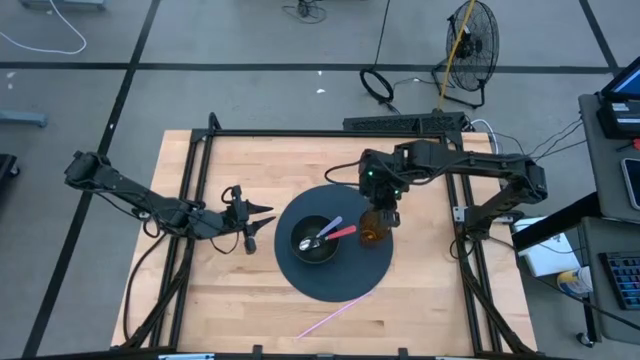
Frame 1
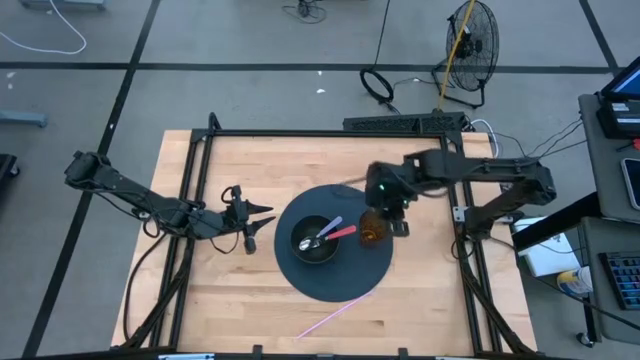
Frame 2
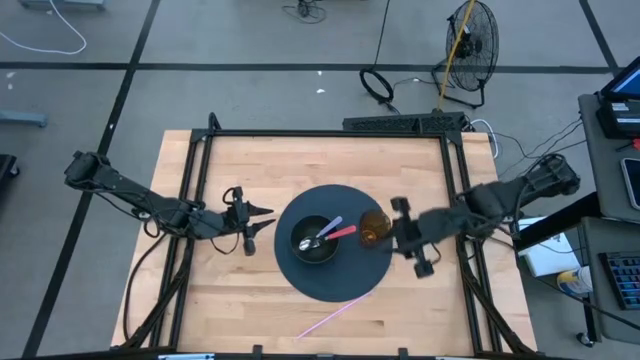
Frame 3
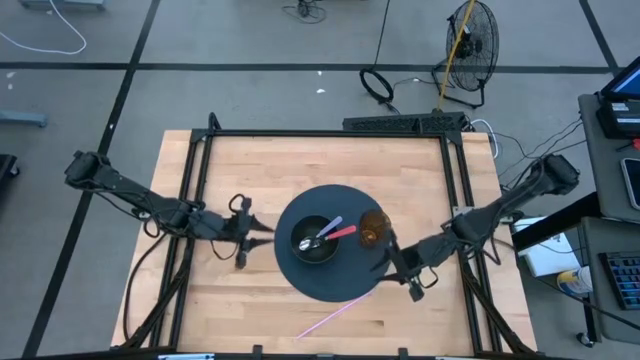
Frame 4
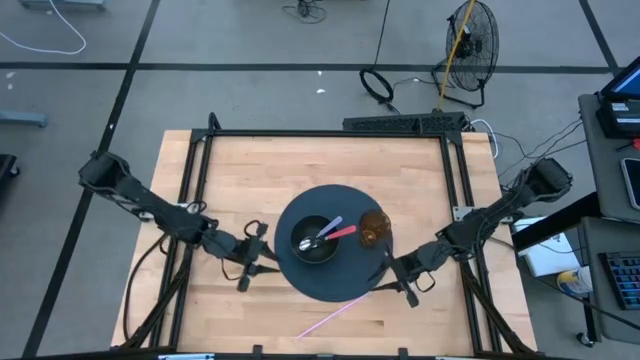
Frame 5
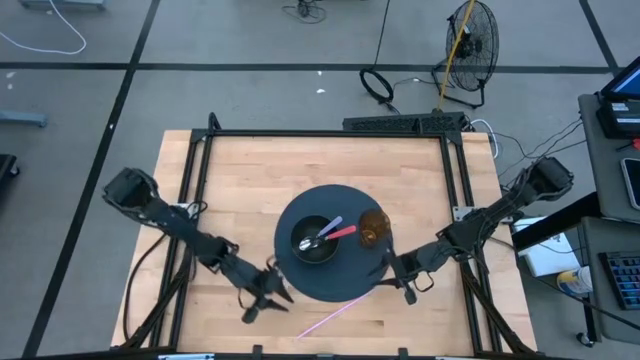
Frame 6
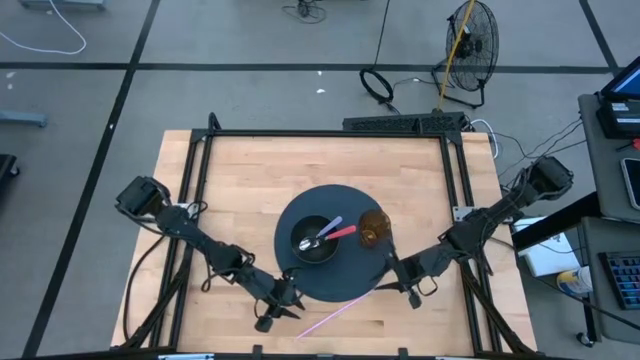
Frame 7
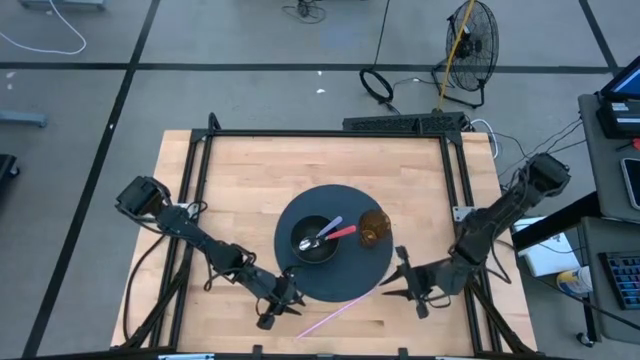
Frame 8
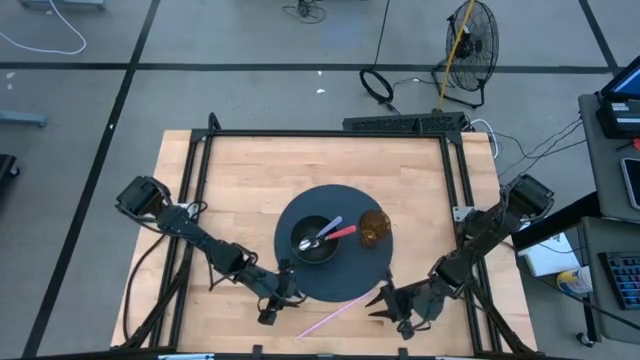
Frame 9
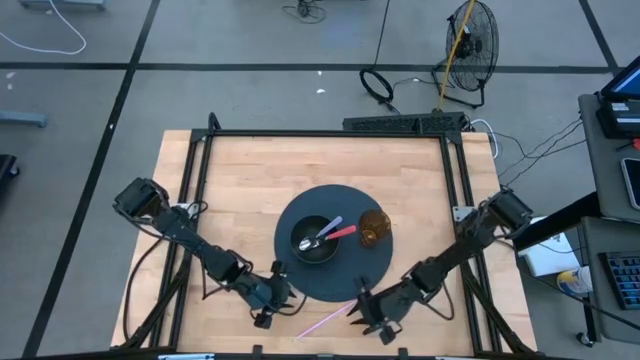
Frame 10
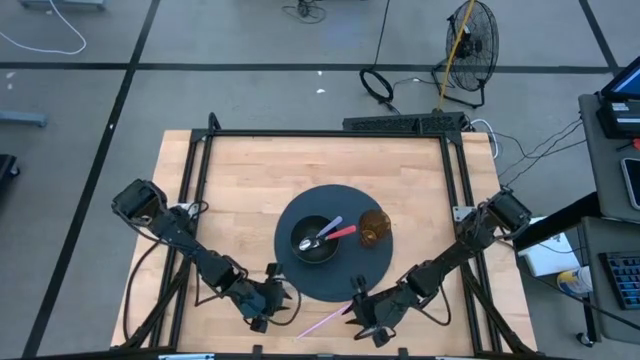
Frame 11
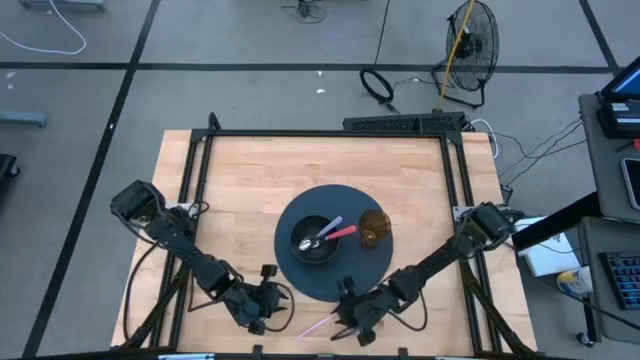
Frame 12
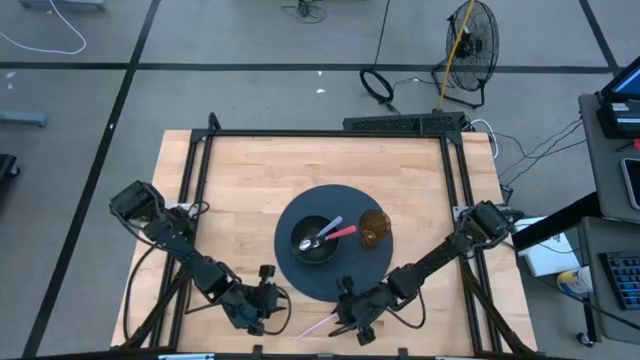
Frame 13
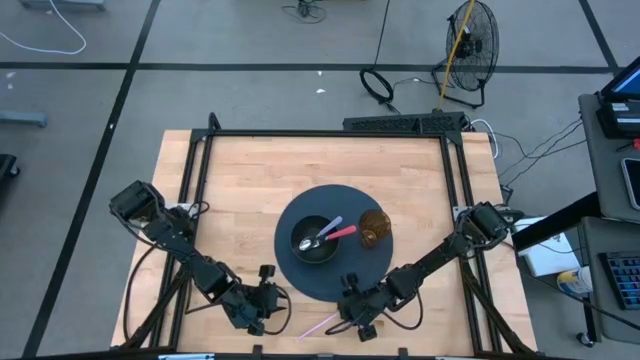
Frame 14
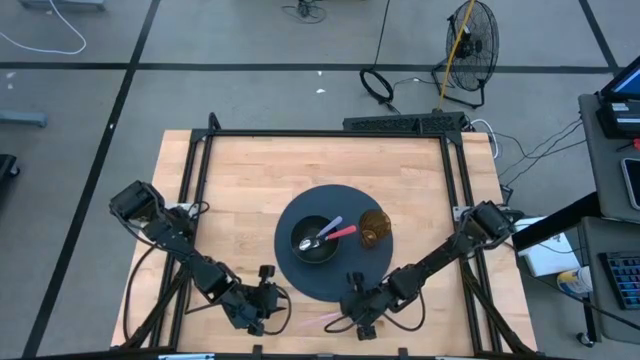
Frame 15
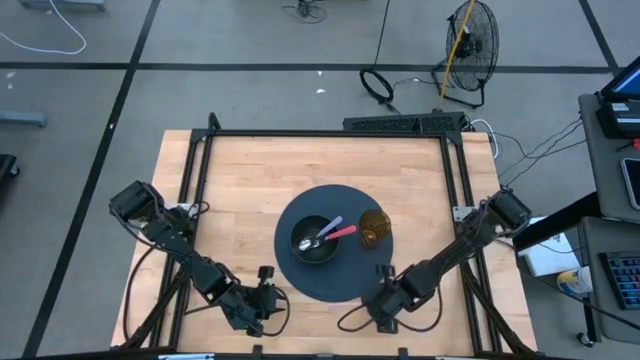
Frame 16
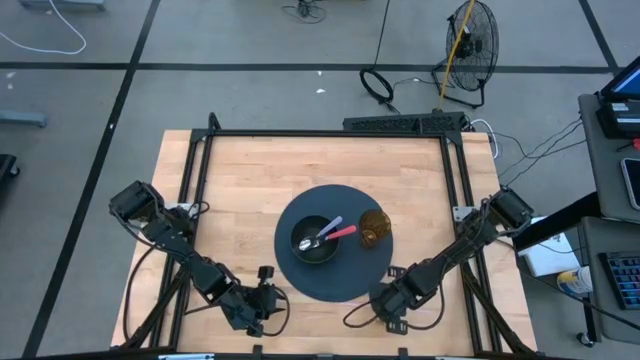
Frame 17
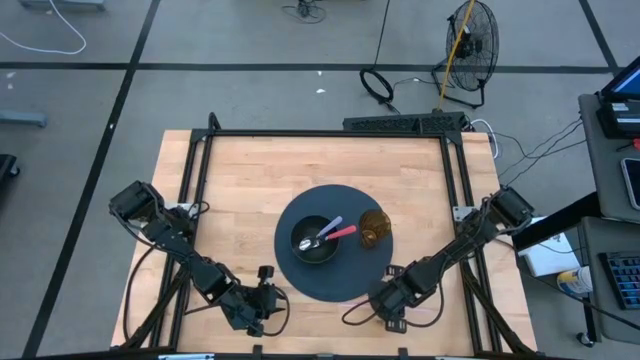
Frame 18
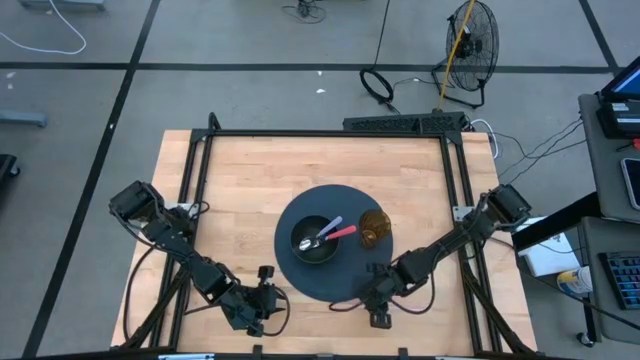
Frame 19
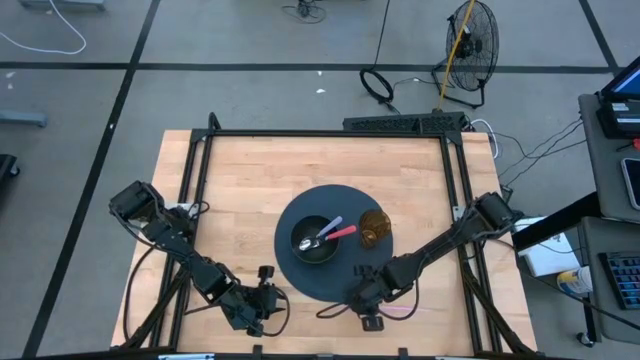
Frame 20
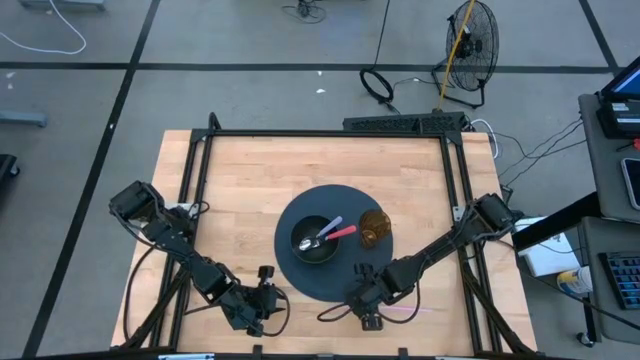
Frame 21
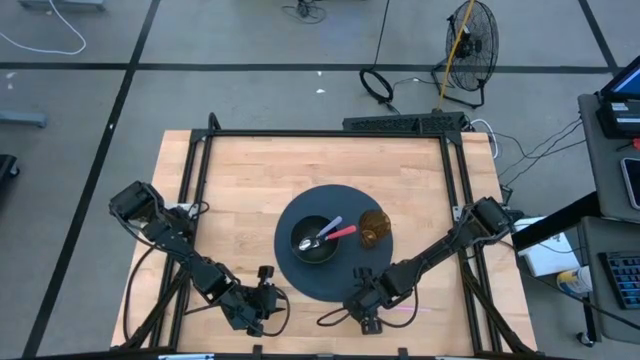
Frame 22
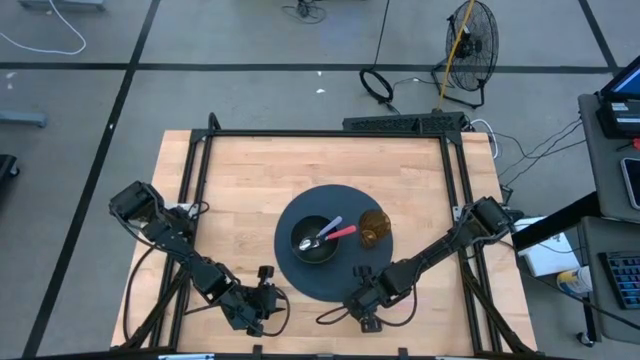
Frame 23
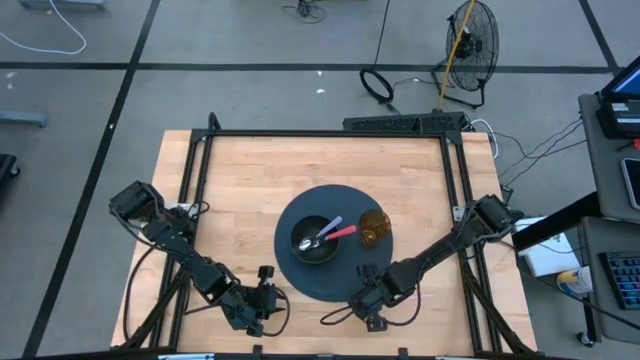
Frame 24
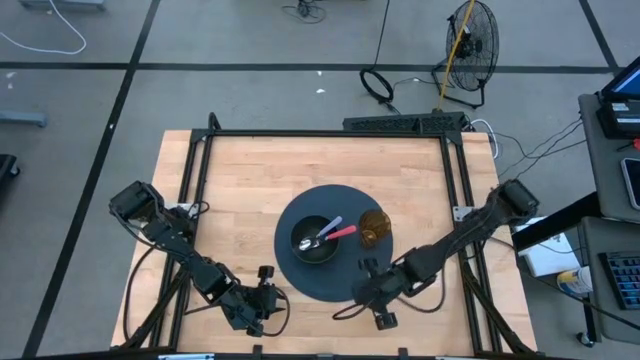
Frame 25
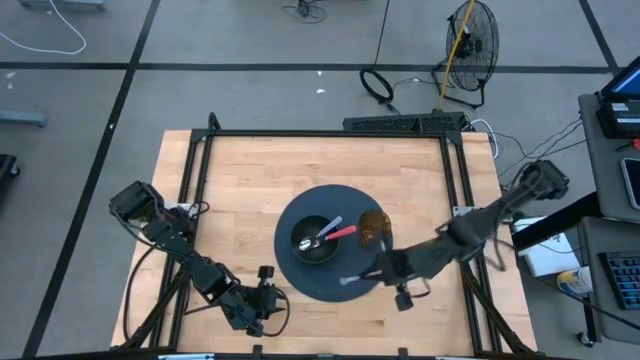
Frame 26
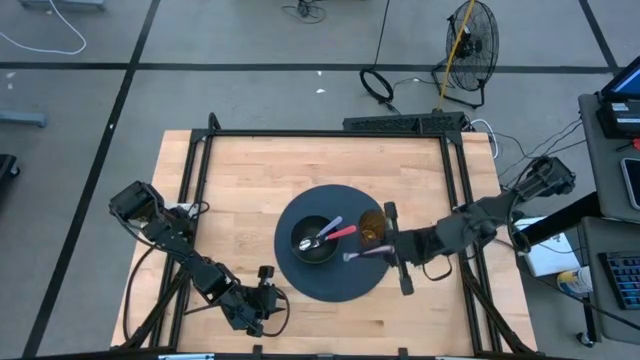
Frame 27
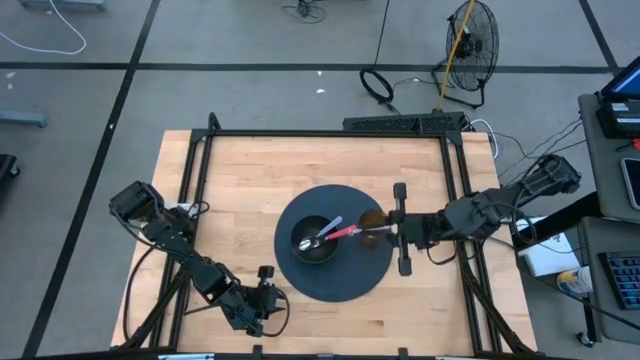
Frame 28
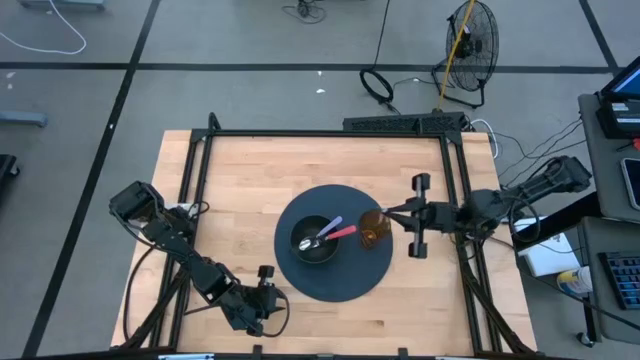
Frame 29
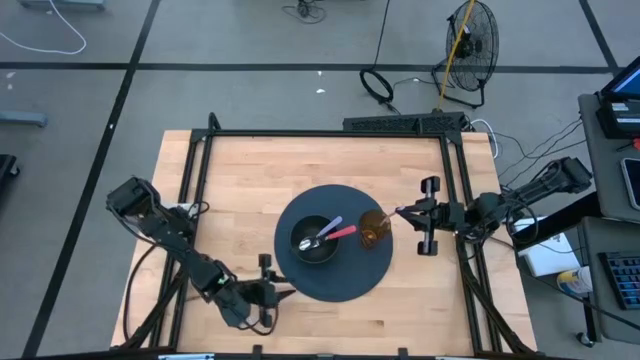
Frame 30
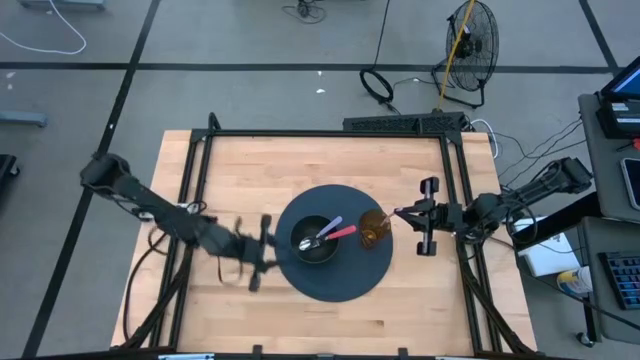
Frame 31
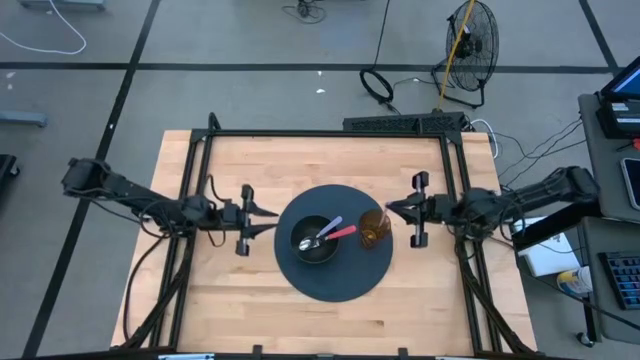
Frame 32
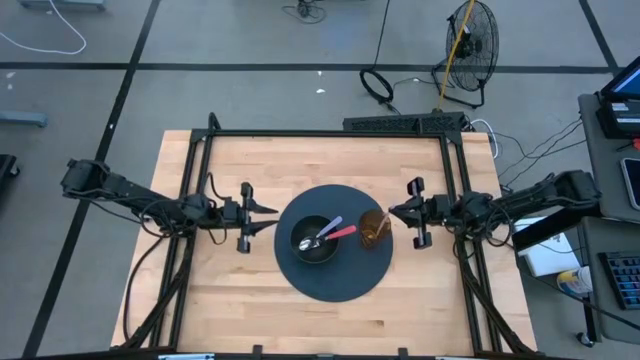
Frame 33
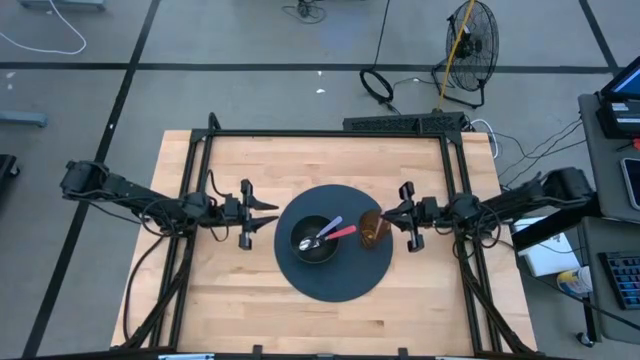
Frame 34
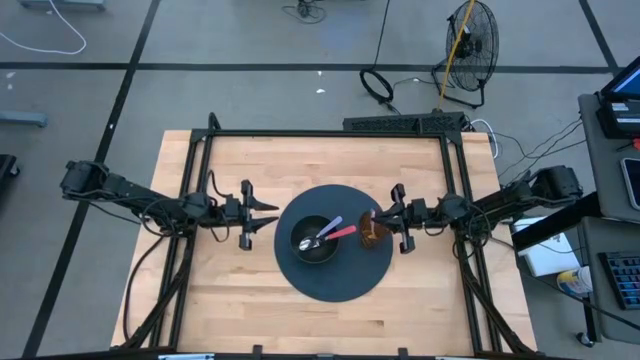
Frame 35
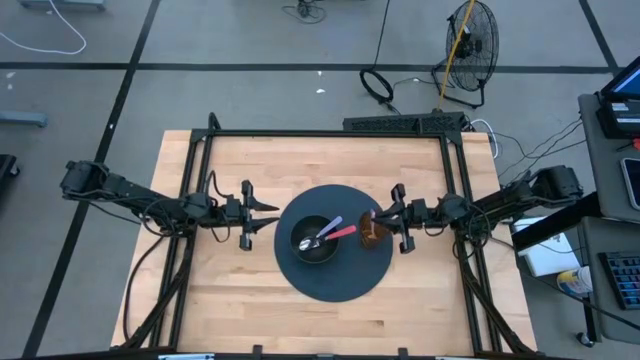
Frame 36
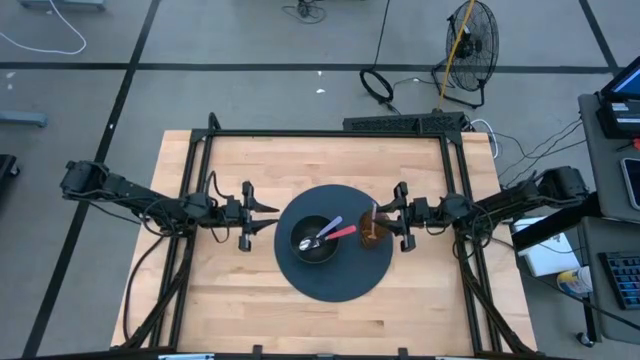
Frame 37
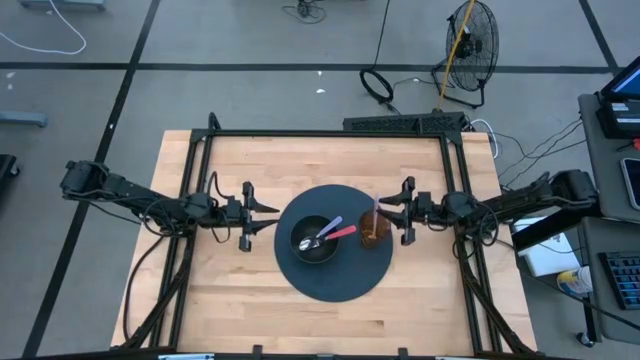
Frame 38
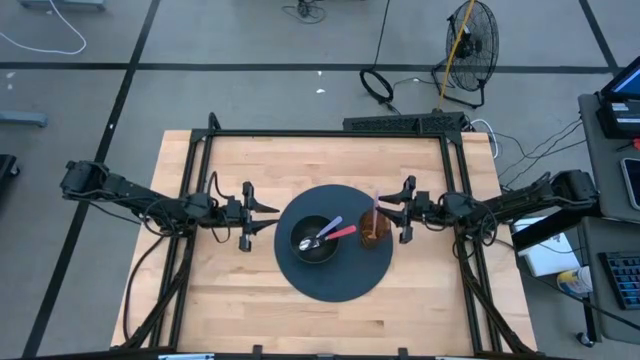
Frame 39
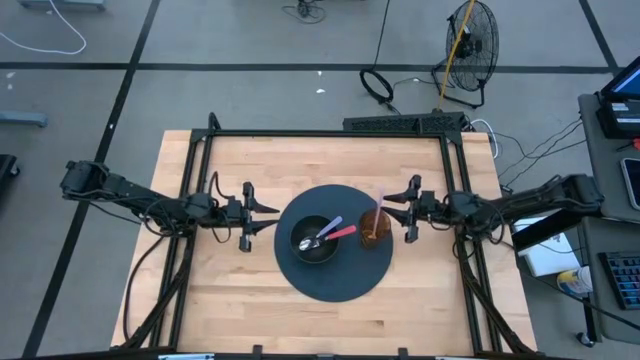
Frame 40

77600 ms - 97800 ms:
Task: Pick & Place Utensil
Put the pink straw into the brown cup

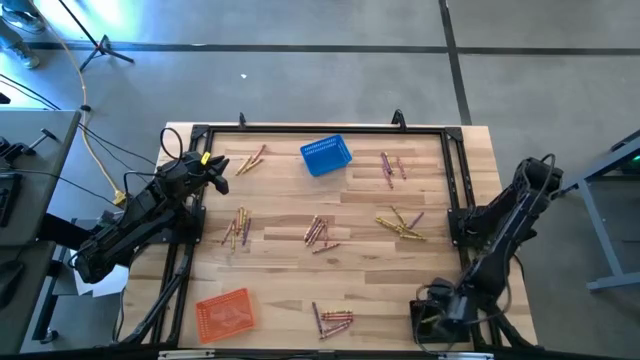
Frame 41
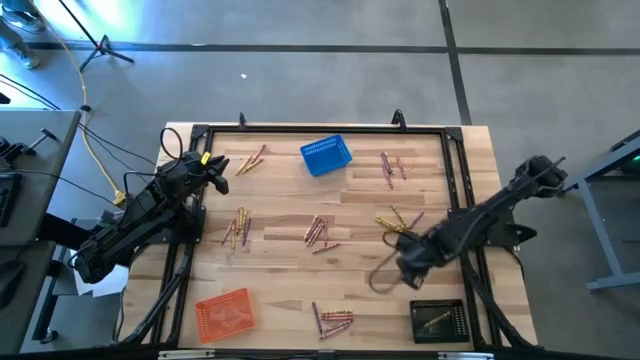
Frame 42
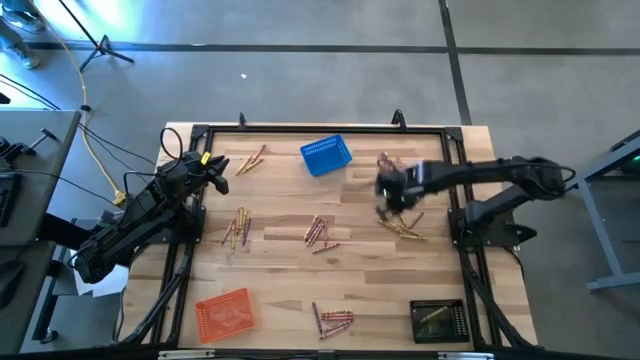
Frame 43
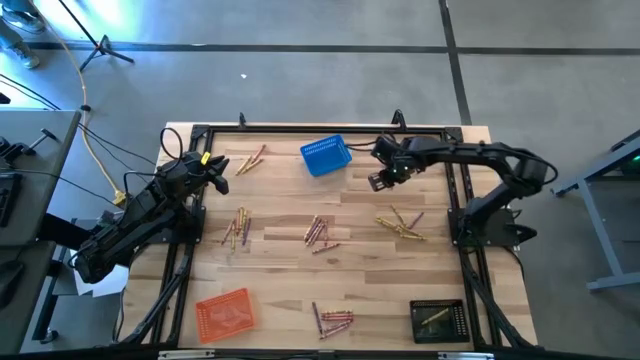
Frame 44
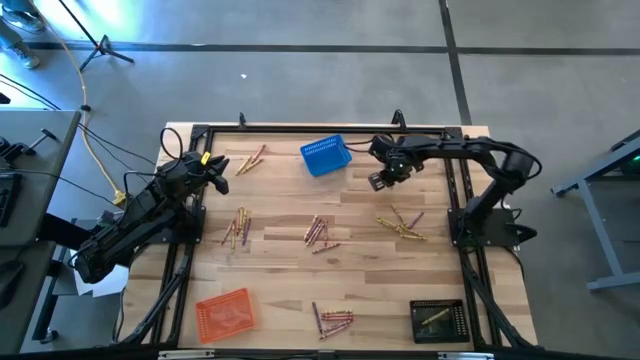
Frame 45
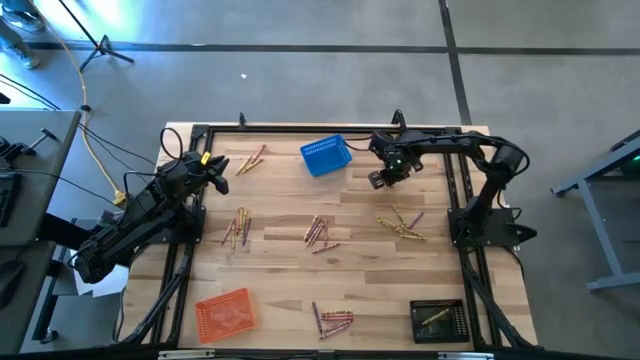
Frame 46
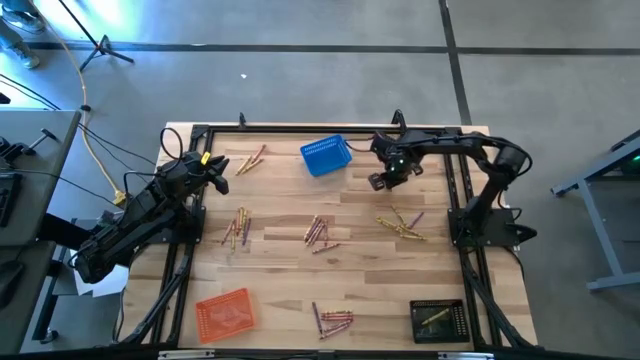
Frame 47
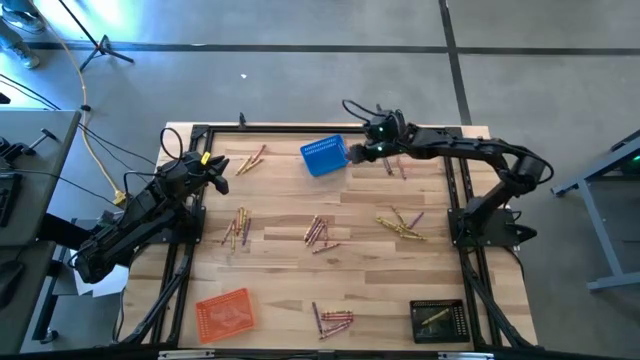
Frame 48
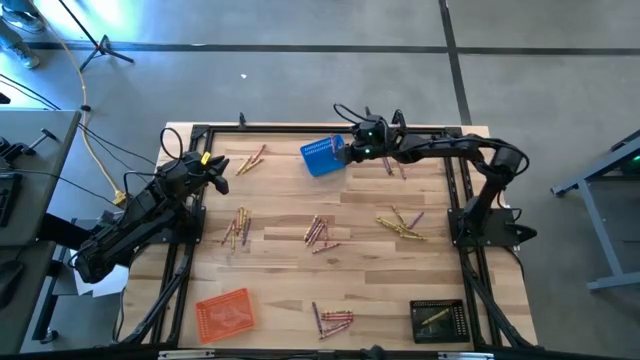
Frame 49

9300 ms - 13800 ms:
Task: Sort crayons
Put the red crayon into the blue bin
